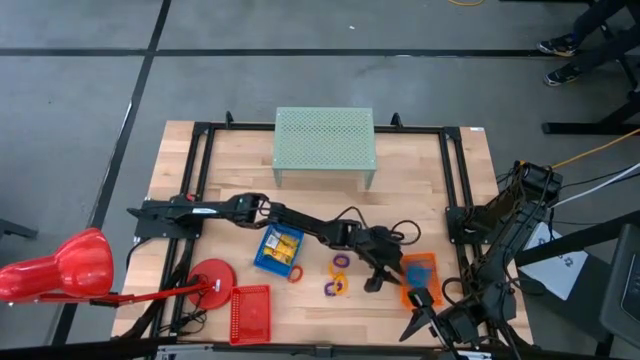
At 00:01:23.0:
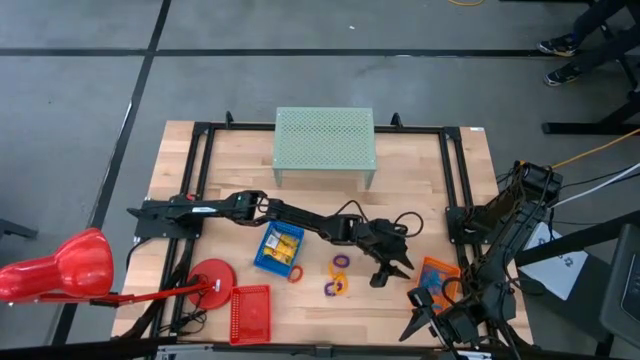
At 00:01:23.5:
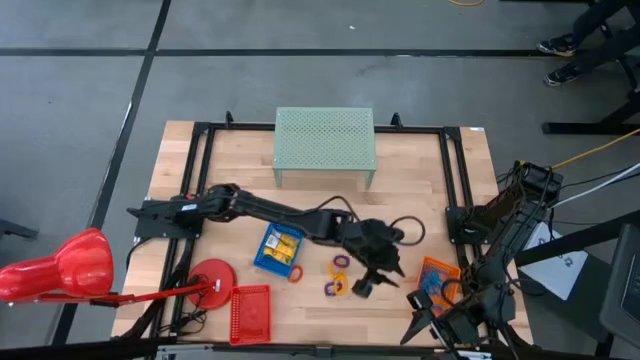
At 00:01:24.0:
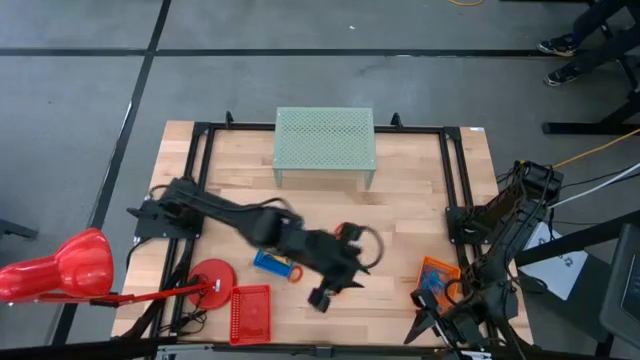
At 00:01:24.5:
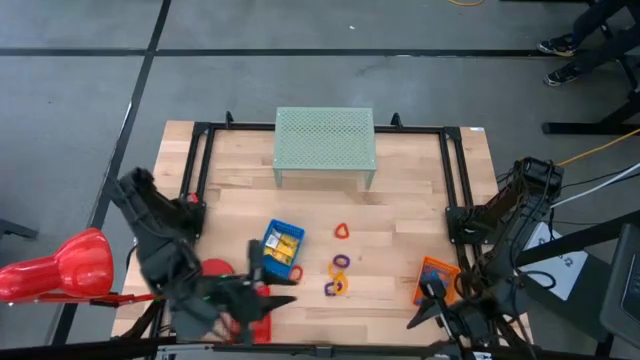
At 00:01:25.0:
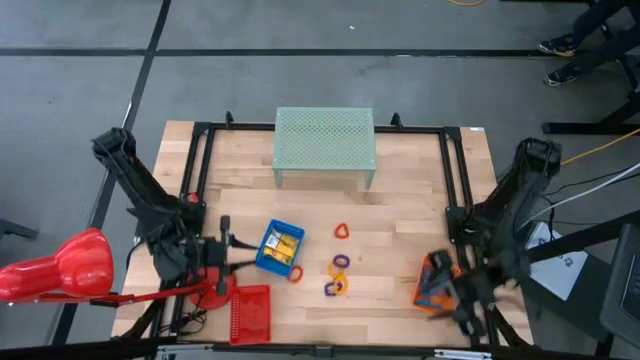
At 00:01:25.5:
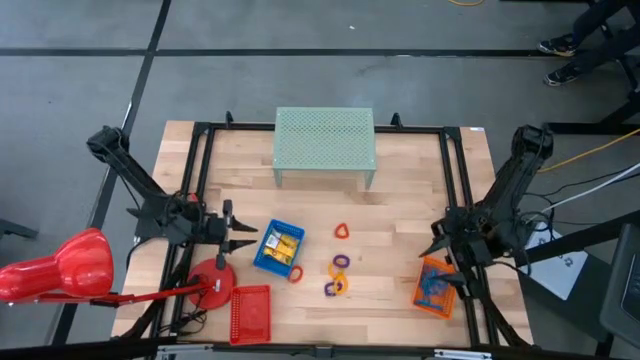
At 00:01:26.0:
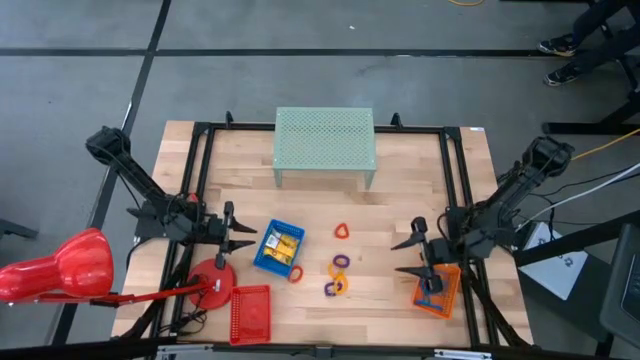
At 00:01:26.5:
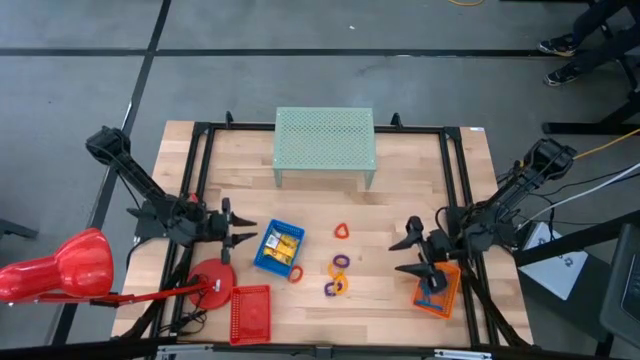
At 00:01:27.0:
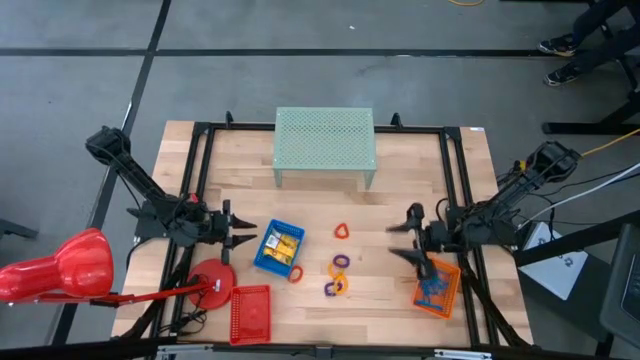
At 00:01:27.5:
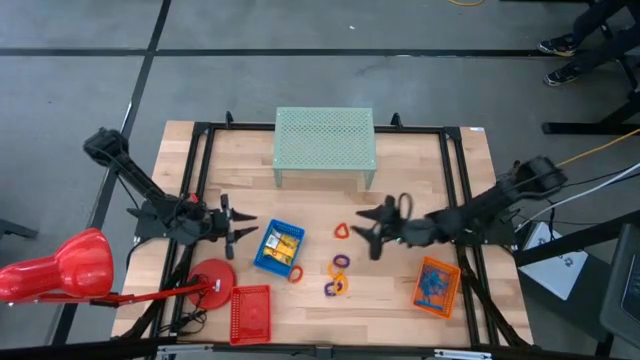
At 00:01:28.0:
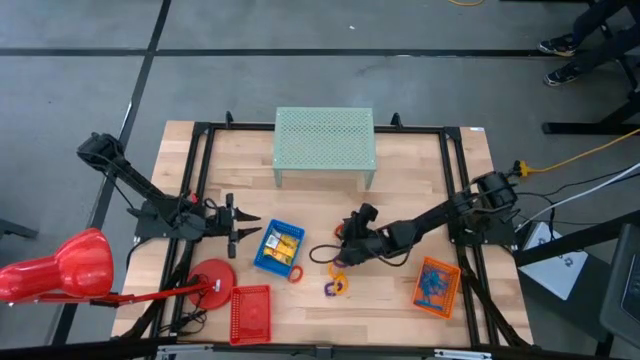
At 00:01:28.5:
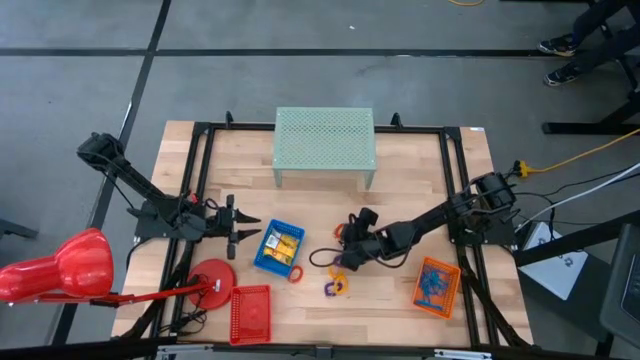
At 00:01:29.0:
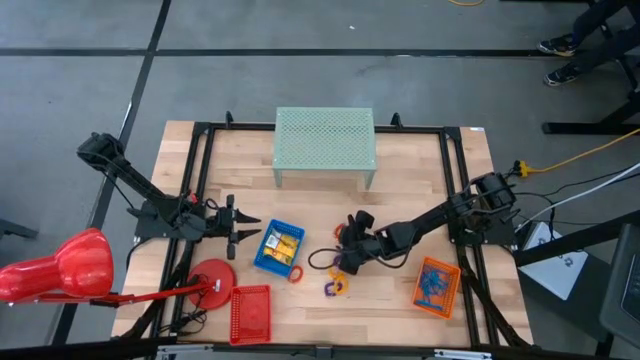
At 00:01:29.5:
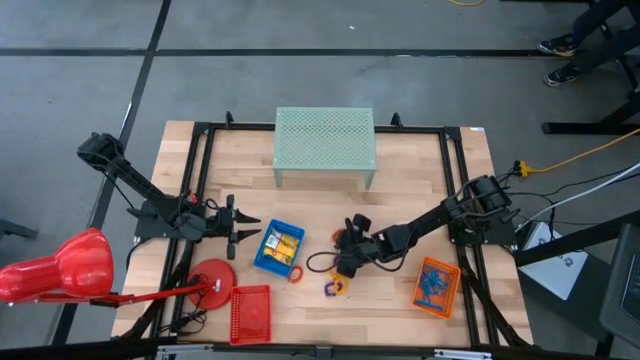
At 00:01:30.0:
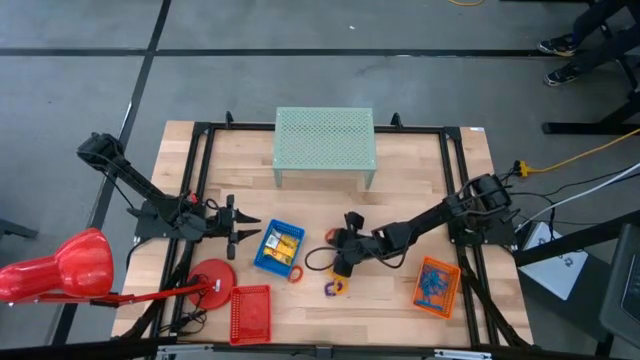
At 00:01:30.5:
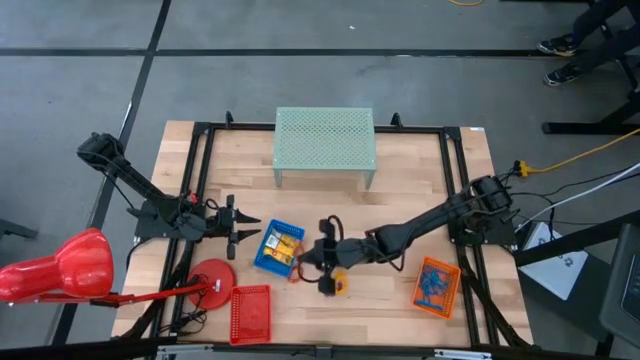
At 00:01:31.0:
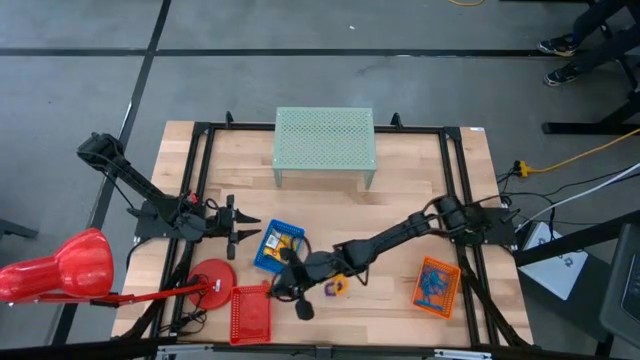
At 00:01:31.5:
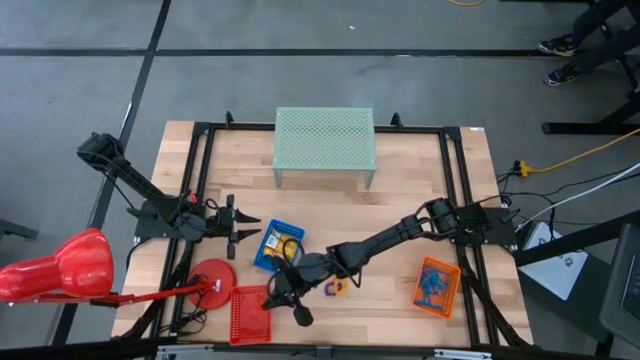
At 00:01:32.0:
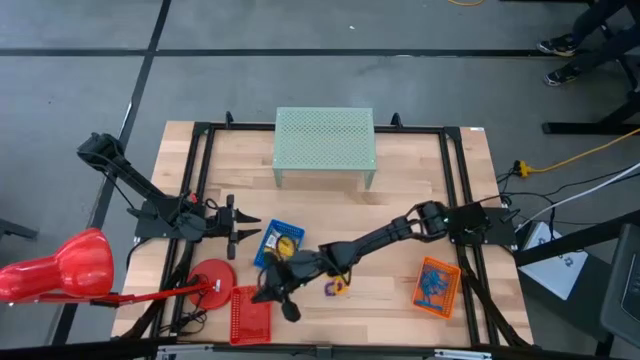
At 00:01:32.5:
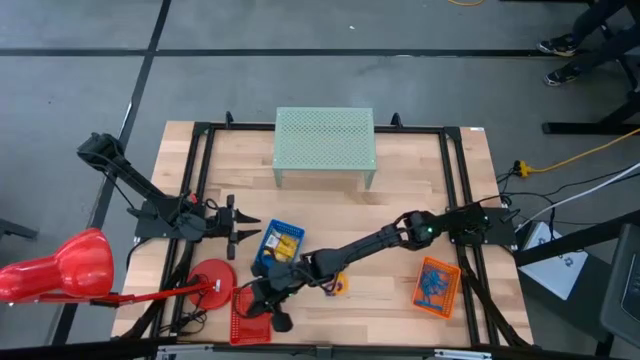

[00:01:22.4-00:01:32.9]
Task: Pick & Place Office Desk Supplies
Put the top orange spiral band into the red bin

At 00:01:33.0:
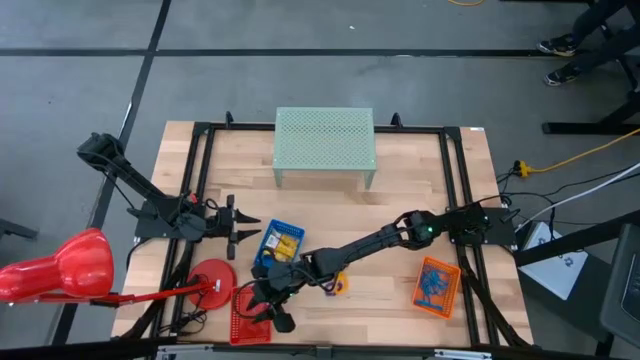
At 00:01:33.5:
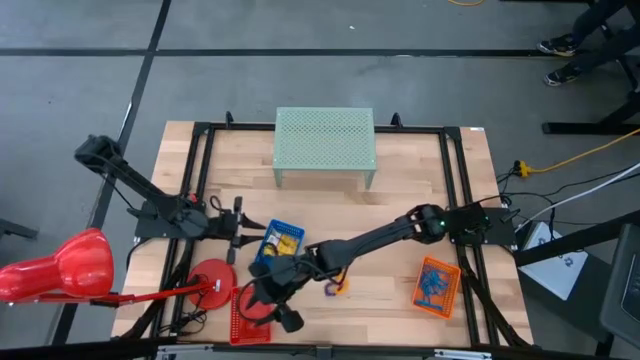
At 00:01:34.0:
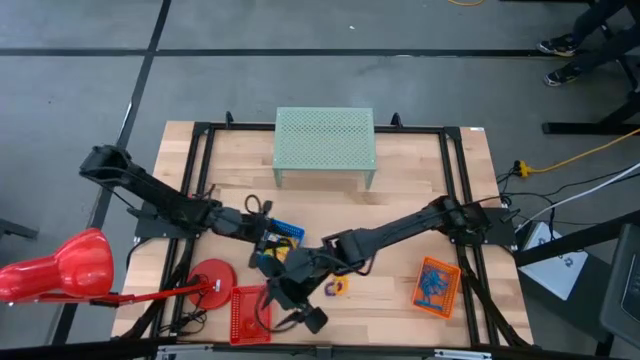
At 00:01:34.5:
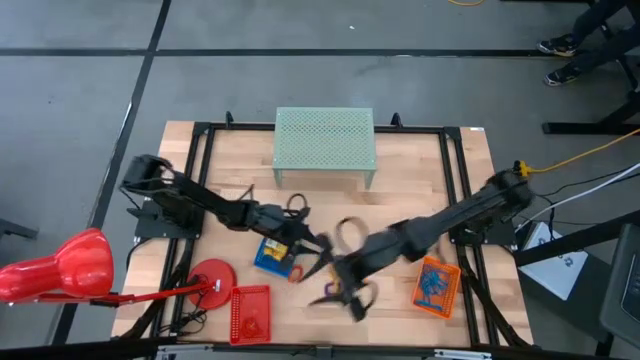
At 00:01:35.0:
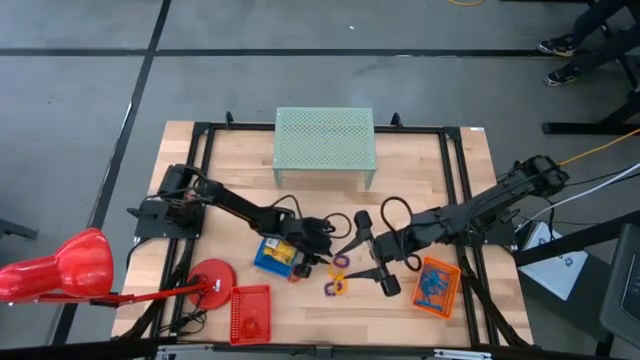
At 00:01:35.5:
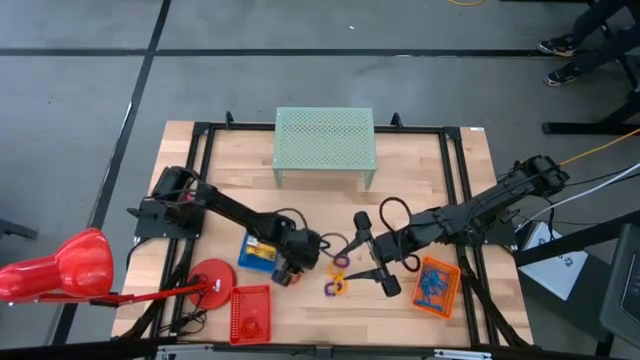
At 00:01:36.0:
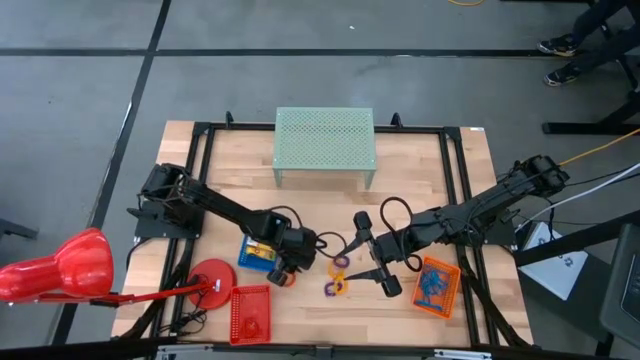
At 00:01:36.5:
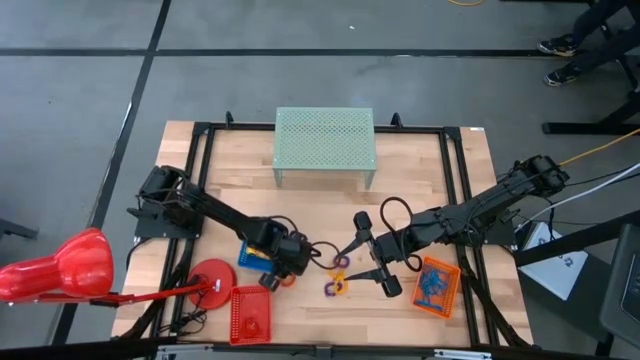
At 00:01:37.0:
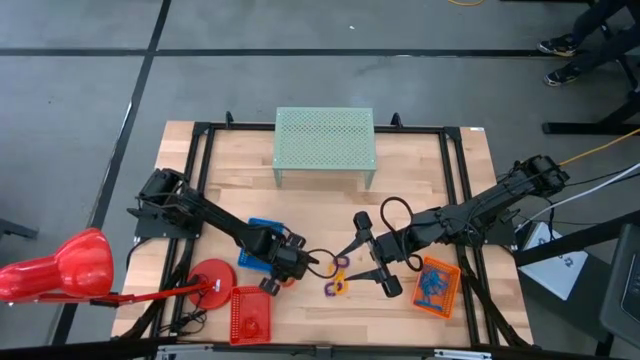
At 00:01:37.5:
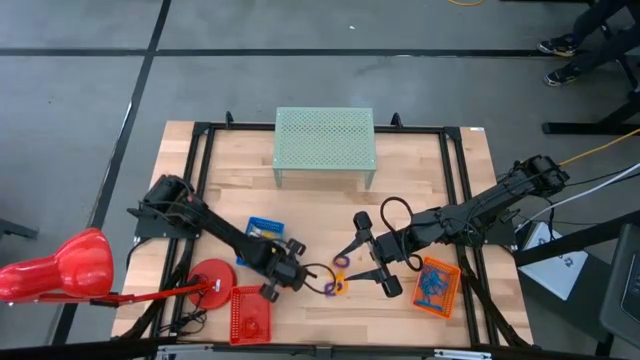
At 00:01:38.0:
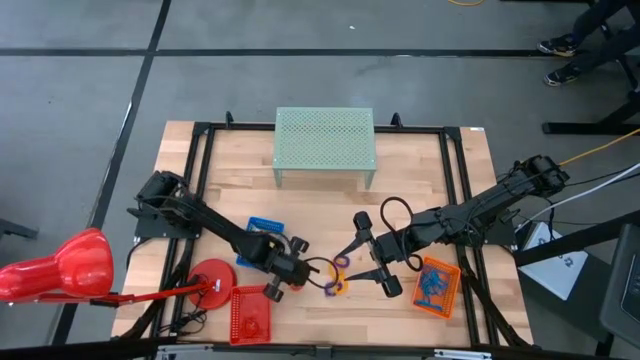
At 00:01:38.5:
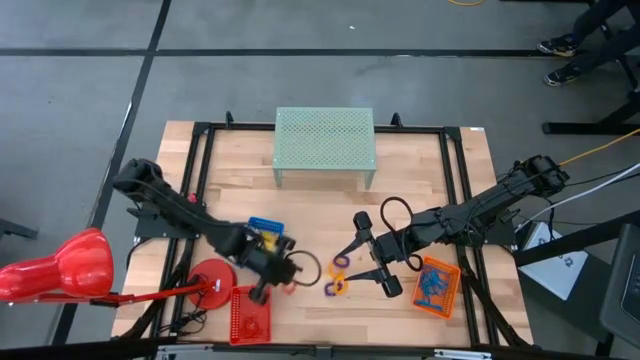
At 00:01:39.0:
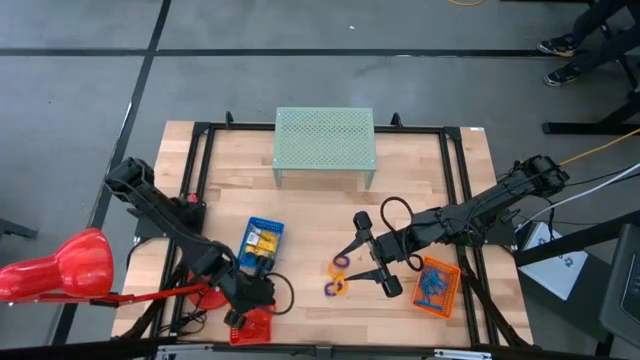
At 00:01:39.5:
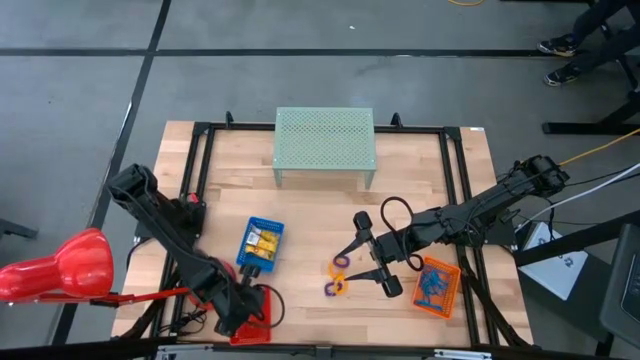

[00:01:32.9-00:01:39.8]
Put the orange spiral band into the red bin

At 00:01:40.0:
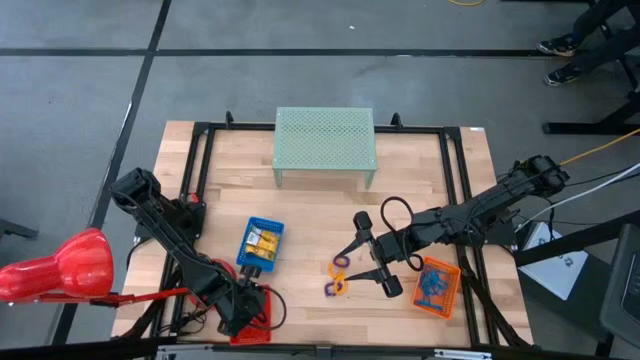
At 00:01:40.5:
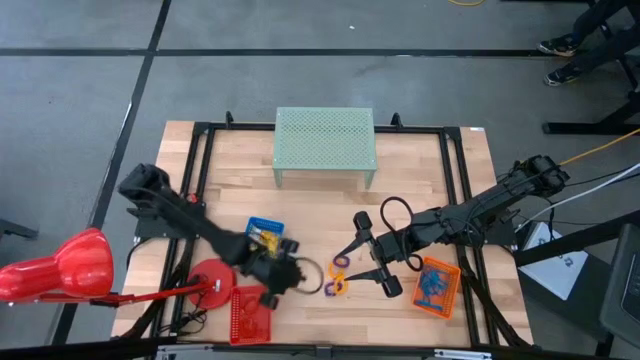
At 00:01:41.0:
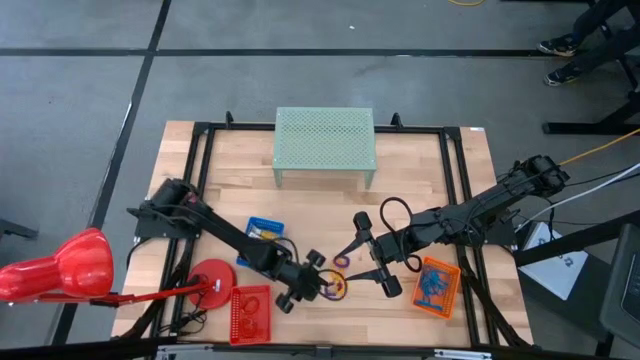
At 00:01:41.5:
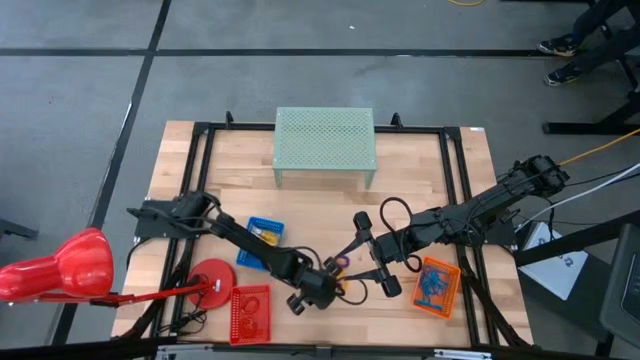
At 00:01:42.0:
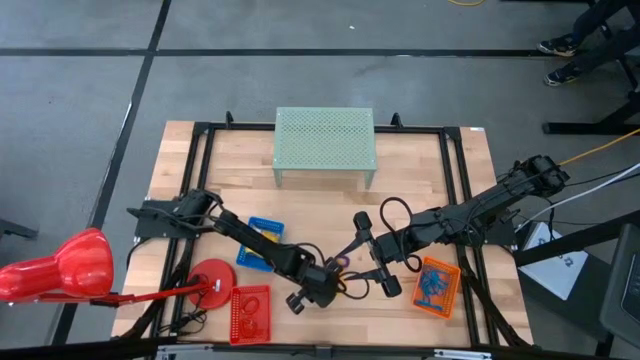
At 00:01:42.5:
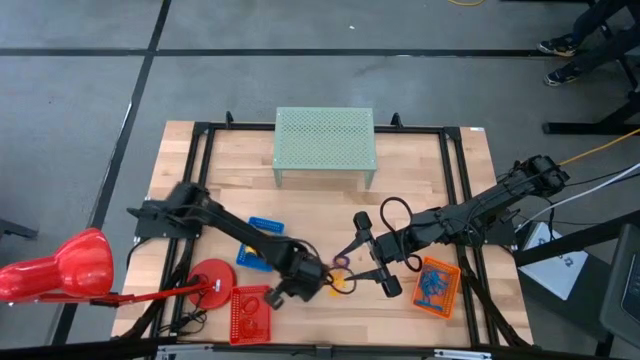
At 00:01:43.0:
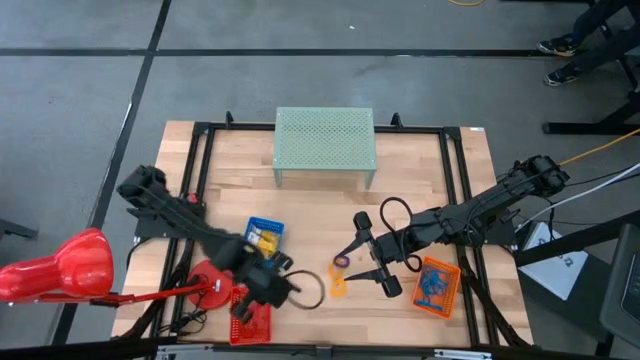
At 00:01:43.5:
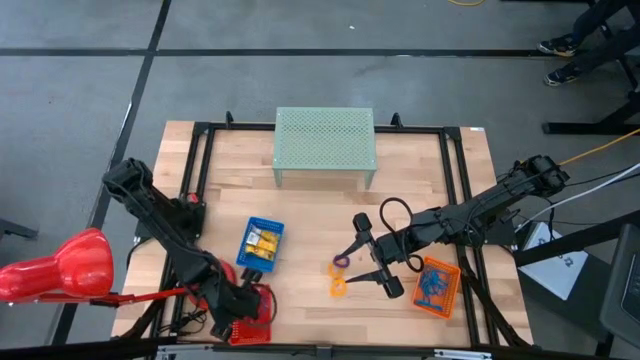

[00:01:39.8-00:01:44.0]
Put the bottom purple spiral band into the red bin
